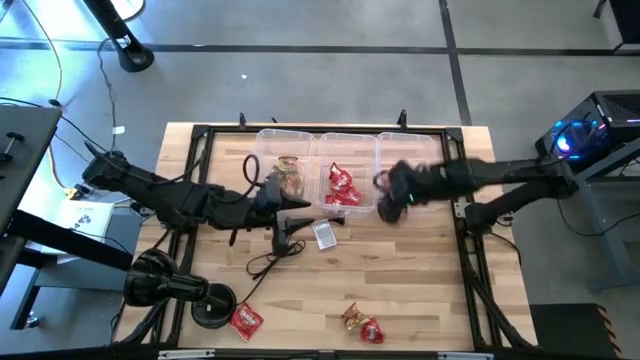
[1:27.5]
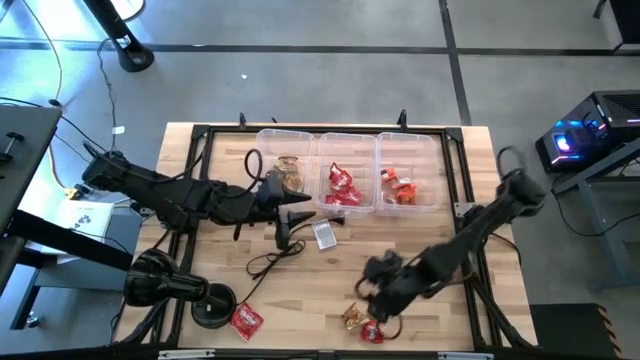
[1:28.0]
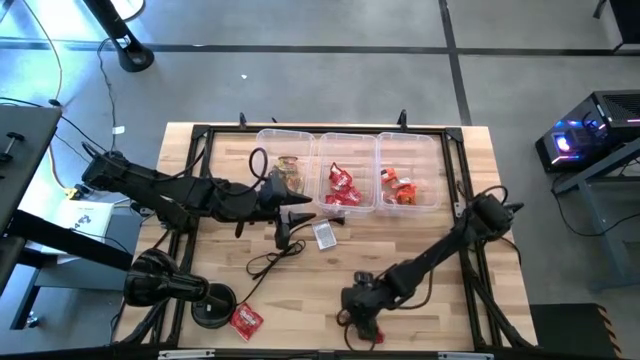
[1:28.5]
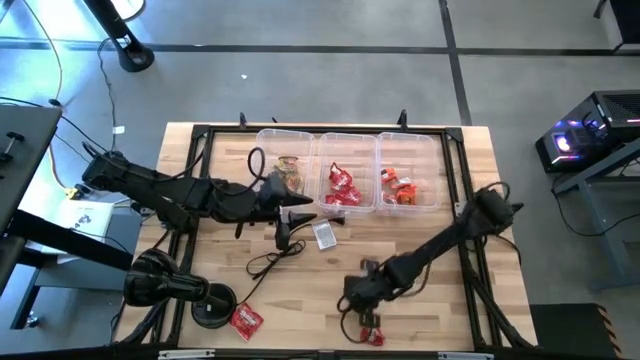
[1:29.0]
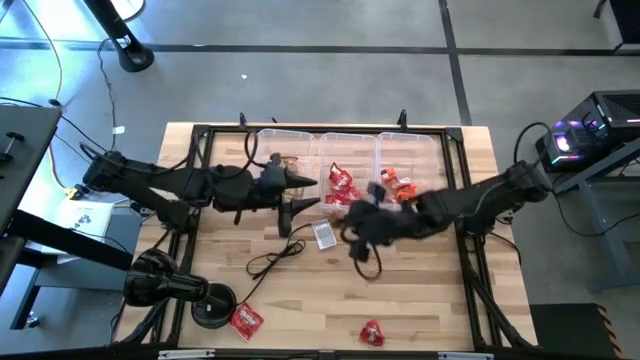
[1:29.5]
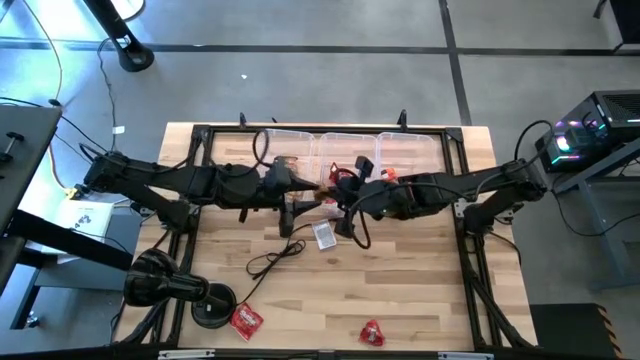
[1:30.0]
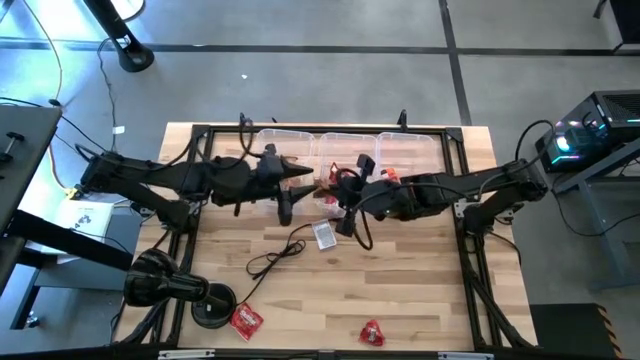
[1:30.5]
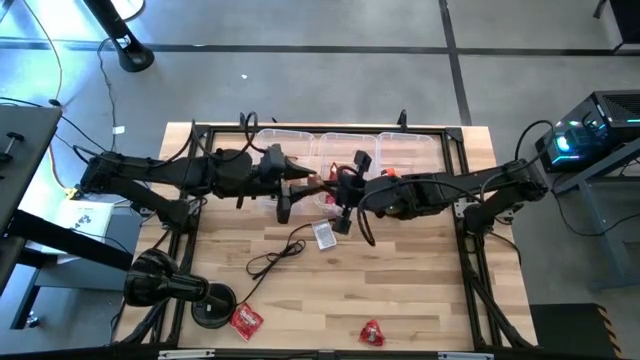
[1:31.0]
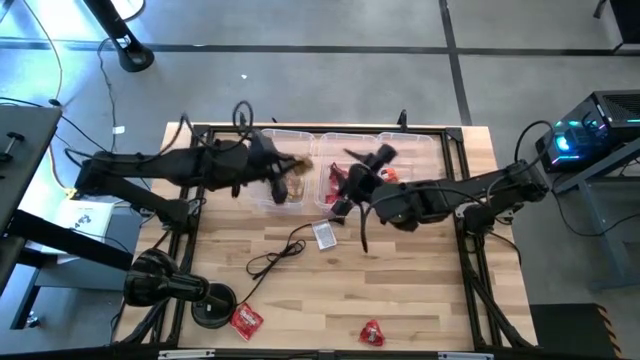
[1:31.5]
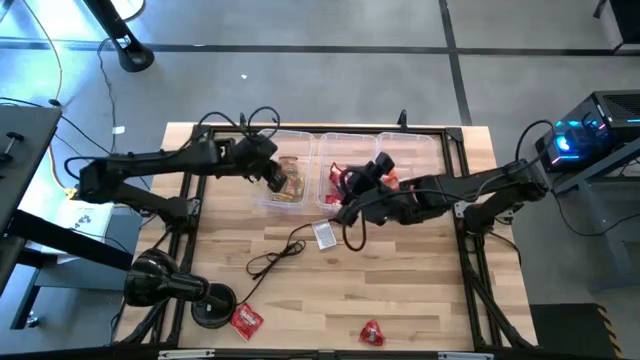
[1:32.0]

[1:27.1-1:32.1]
Task: Sort candy
Put the gold candy pack into the left transparent bin

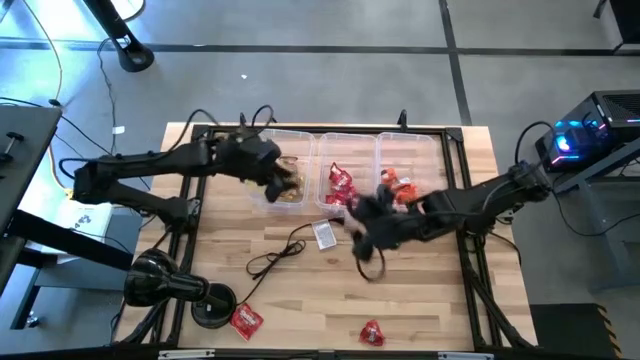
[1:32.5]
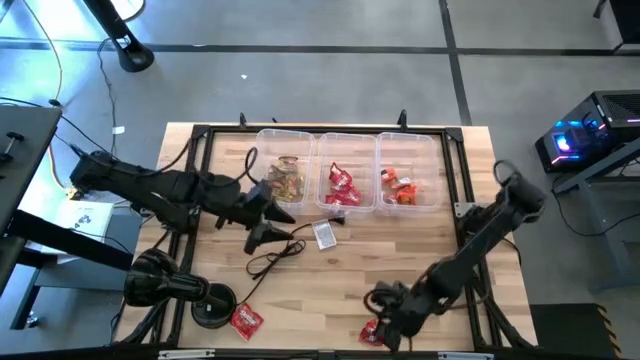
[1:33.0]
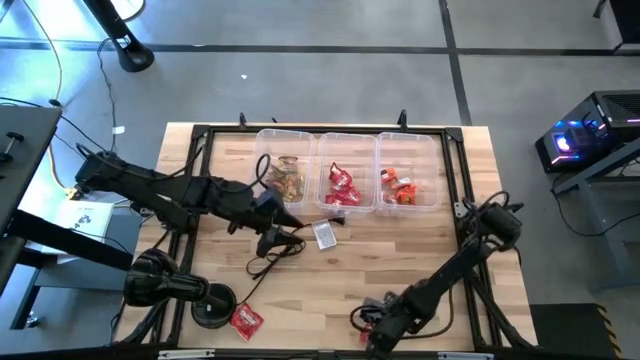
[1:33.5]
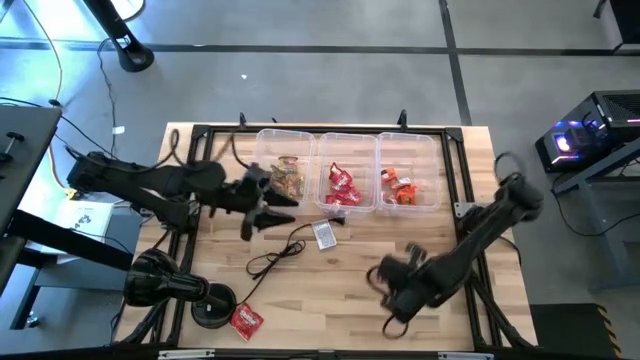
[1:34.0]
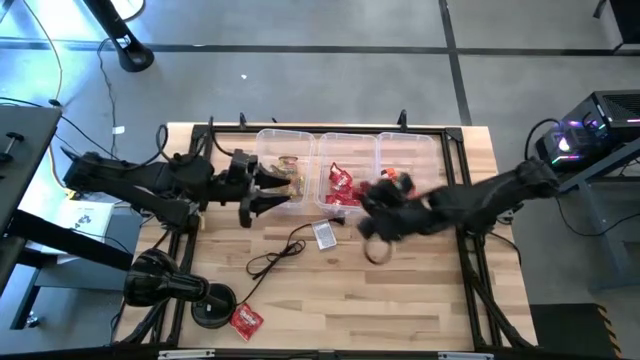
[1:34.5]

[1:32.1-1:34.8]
Put the red candy pack into the middle transparent bin

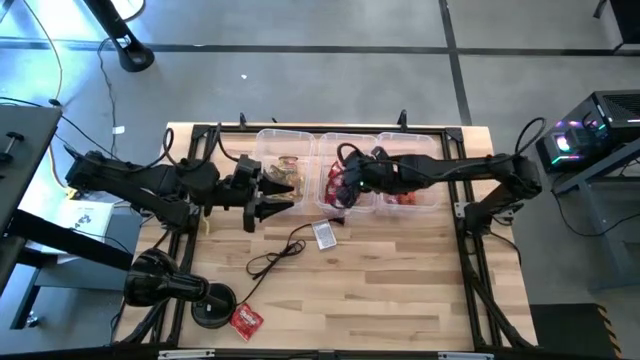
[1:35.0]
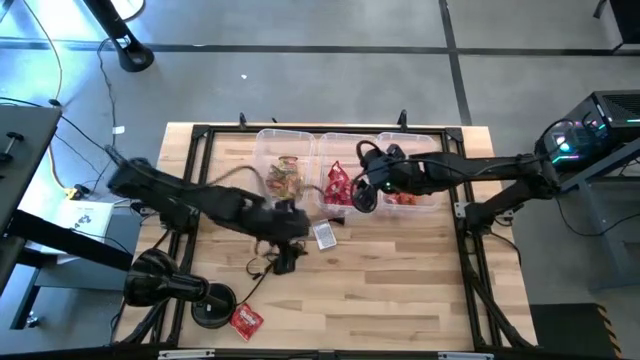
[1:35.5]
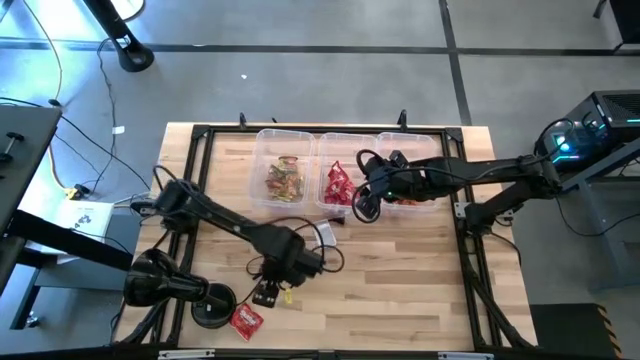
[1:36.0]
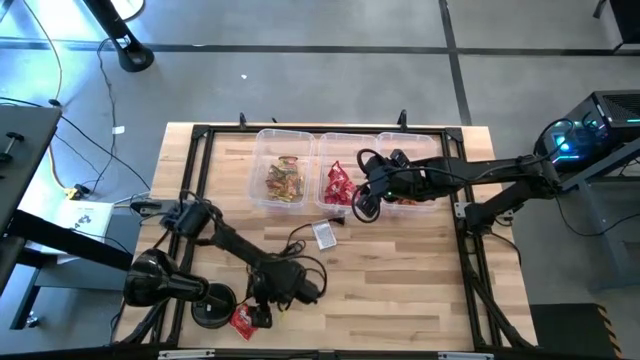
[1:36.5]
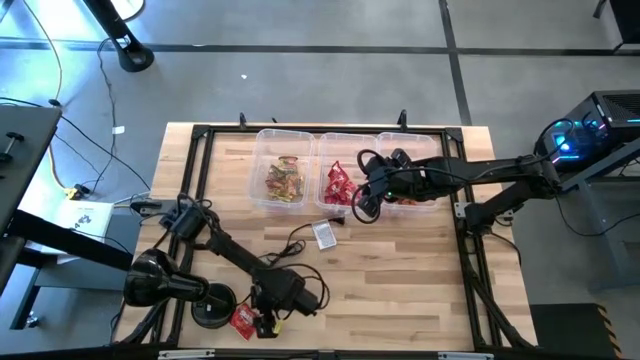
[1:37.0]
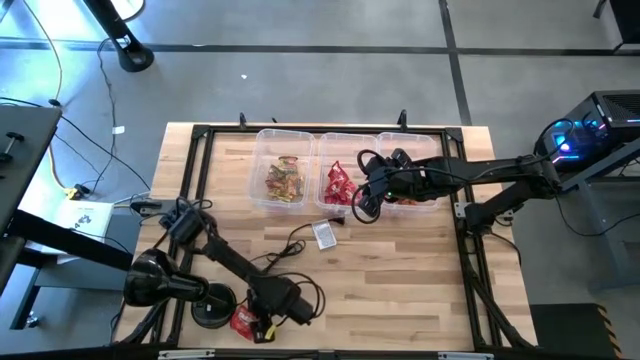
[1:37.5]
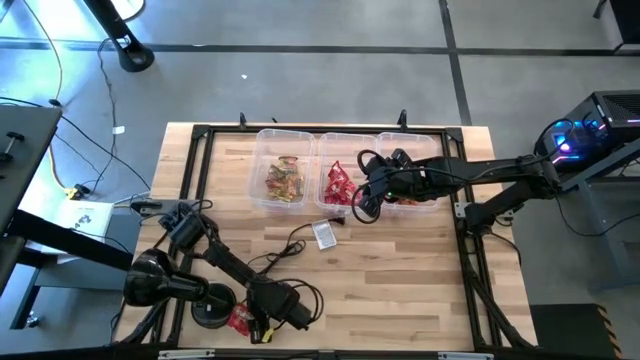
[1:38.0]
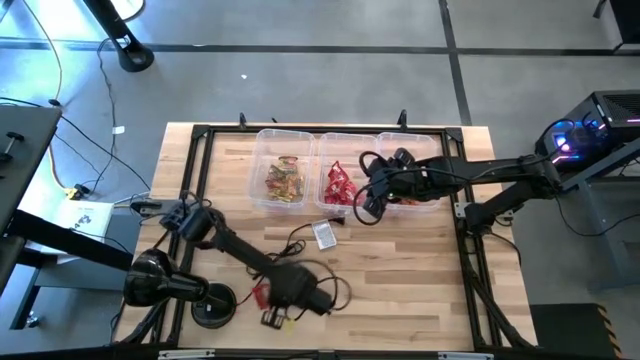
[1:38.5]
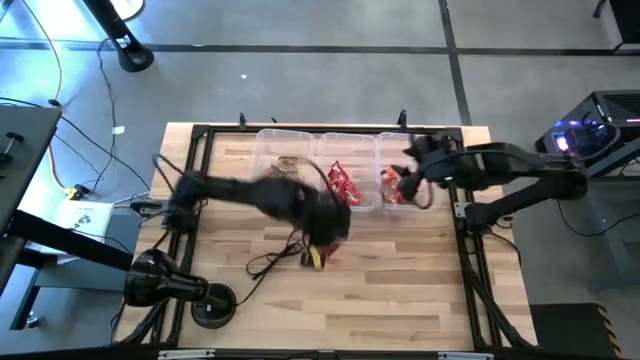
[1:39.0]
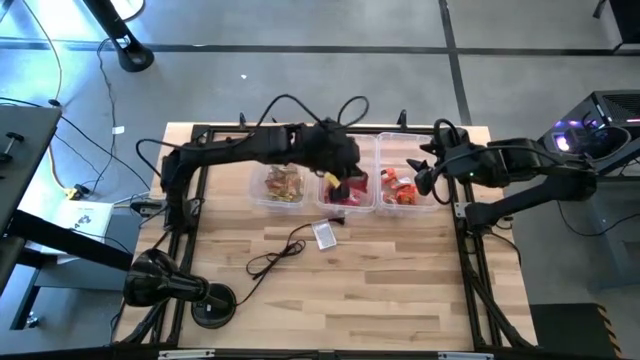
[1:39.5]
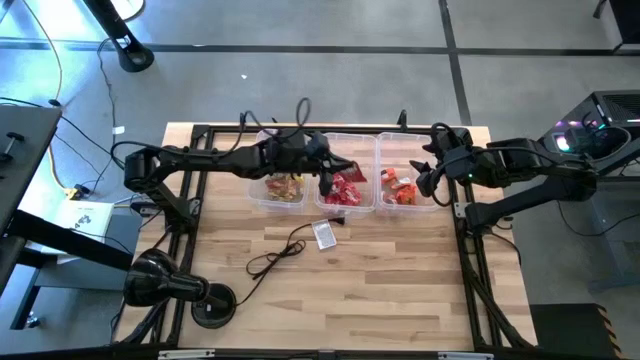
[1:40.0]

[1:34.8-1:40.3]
Put the red candy pack into the middle transparent bin

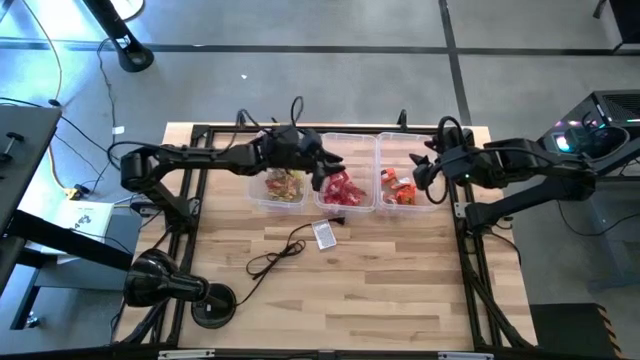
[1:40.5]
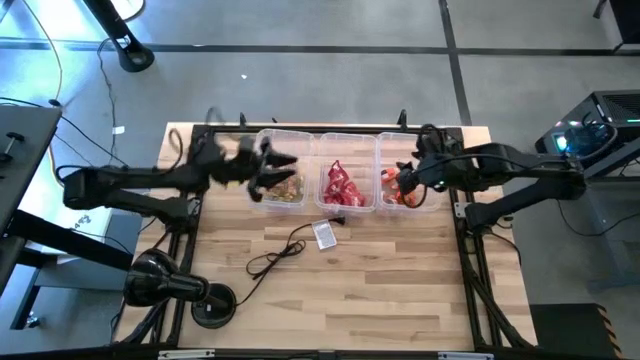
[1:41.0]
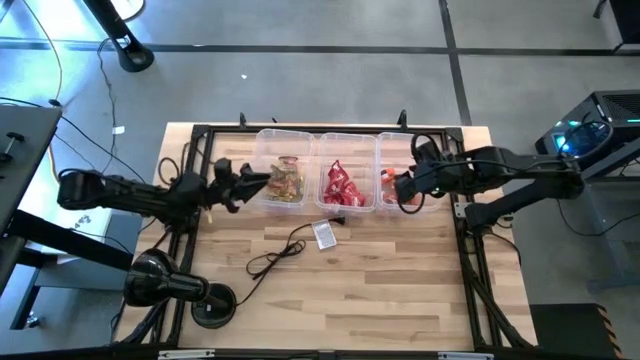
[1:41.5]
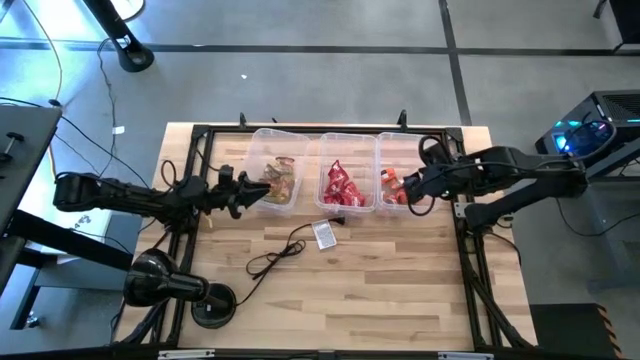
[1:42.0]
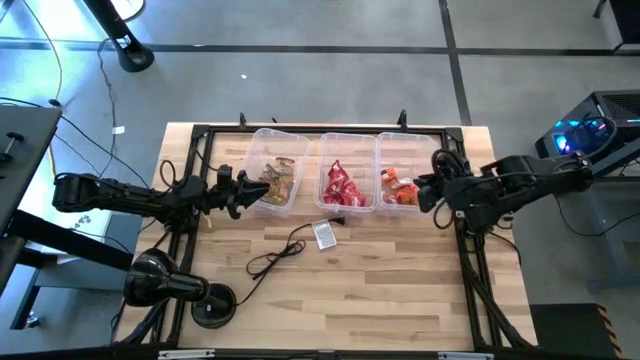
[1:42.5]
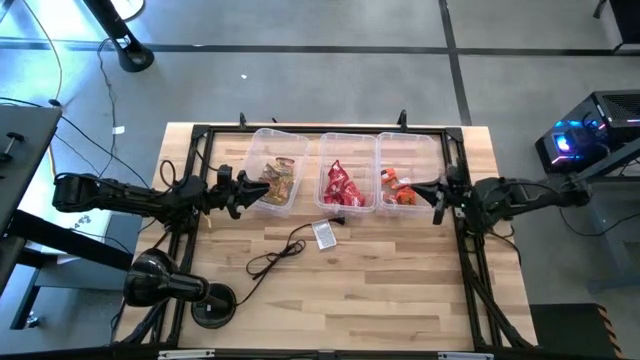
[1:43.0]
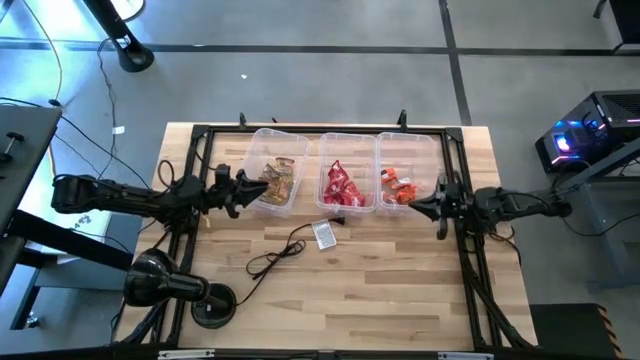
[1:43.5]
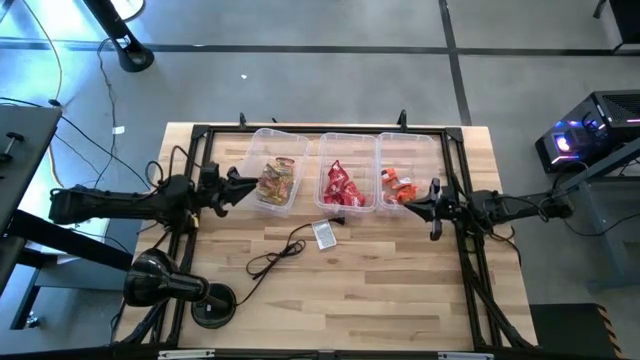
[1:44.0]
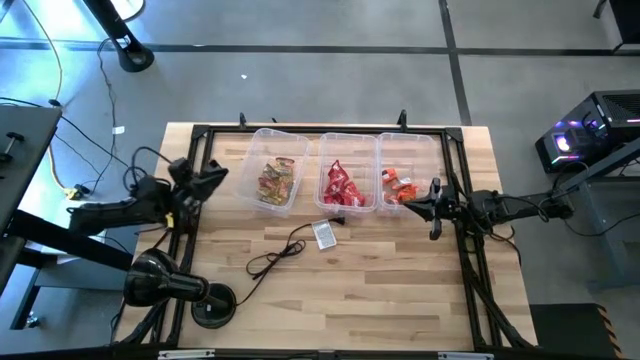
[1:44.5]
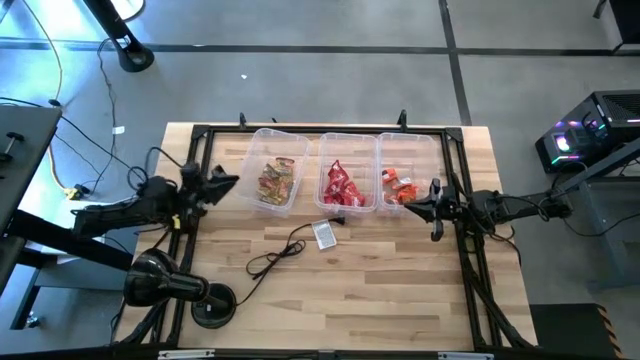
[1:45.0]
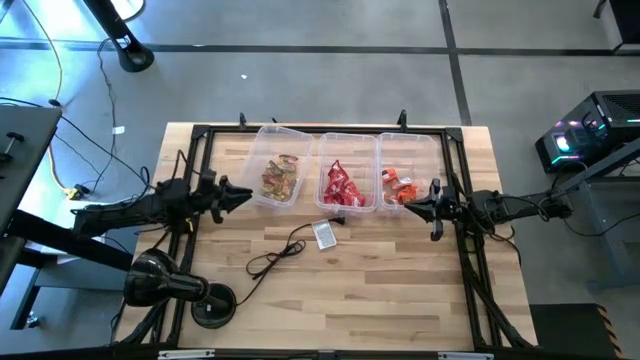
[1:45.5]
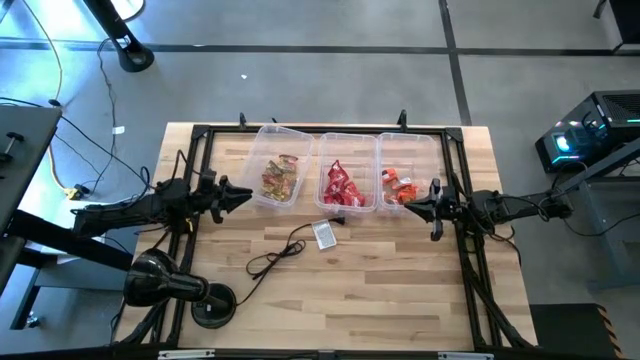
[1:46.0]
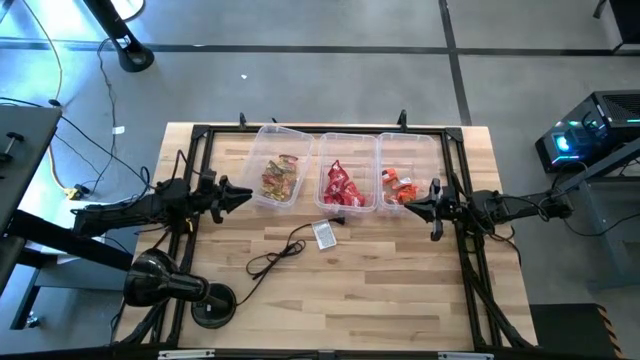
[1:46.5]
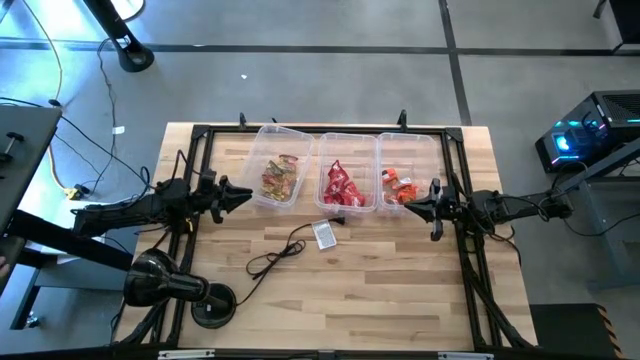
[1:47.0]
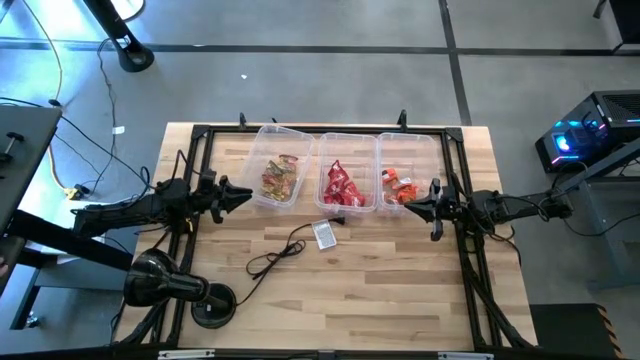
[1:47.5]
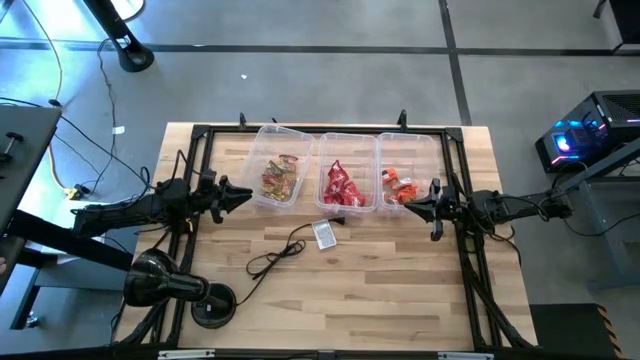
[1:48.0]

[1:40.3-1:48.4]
Return to Home Position
